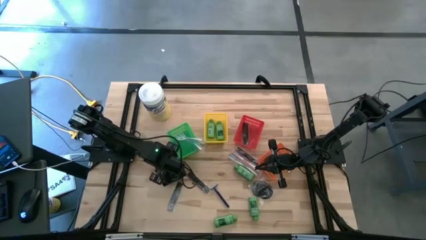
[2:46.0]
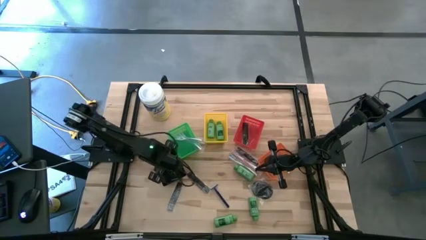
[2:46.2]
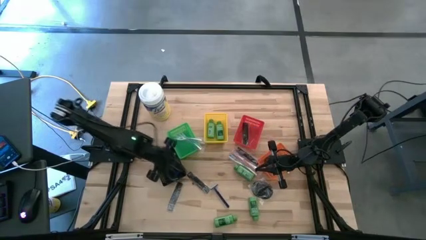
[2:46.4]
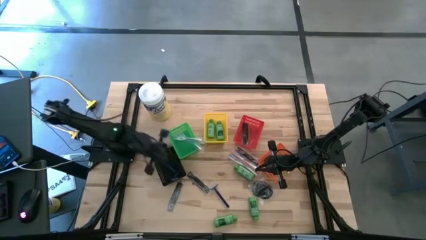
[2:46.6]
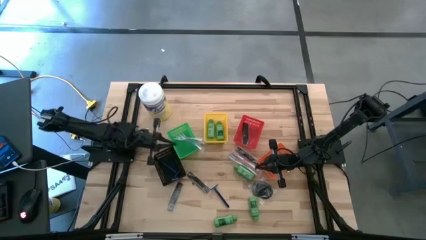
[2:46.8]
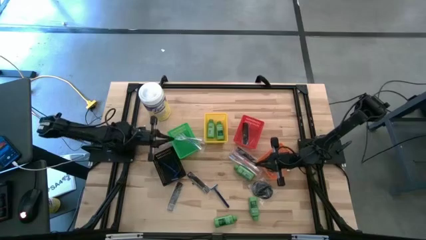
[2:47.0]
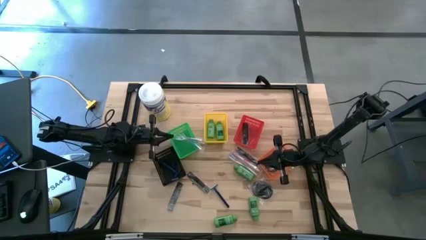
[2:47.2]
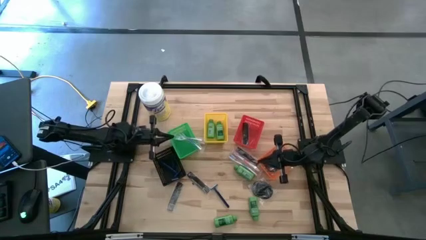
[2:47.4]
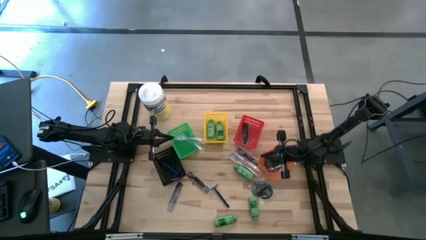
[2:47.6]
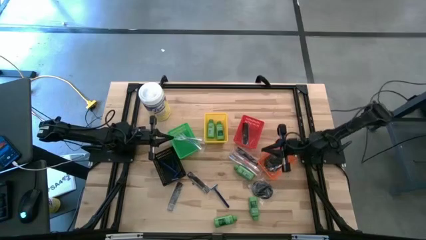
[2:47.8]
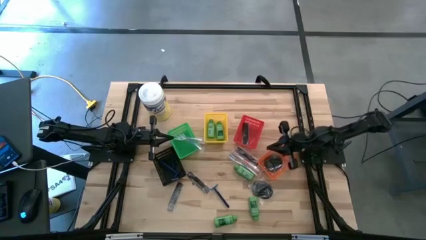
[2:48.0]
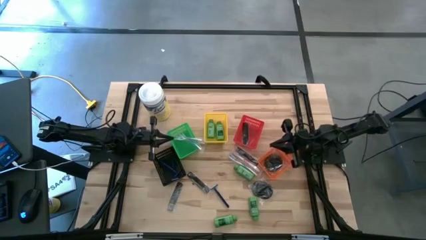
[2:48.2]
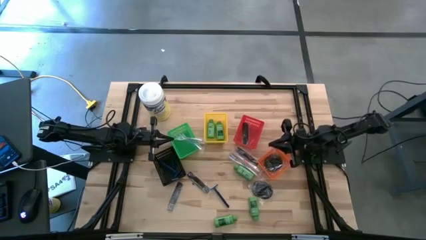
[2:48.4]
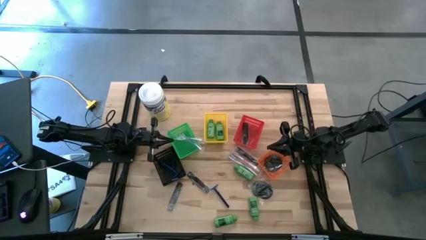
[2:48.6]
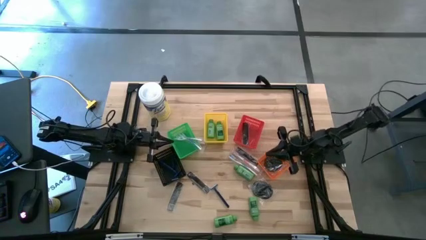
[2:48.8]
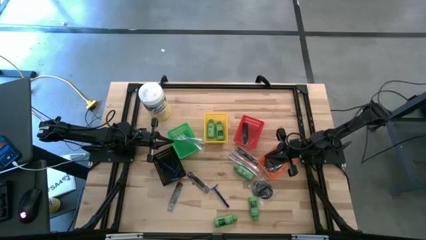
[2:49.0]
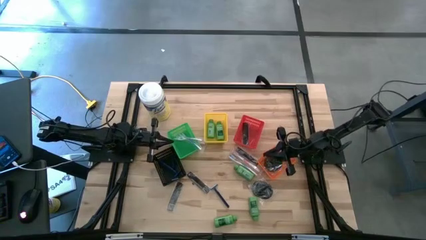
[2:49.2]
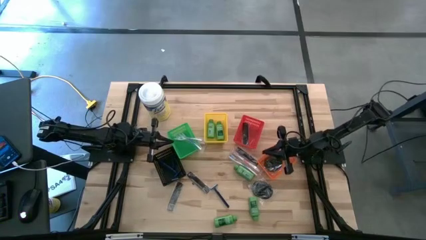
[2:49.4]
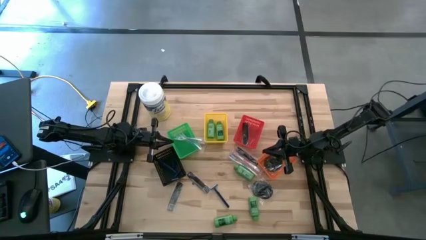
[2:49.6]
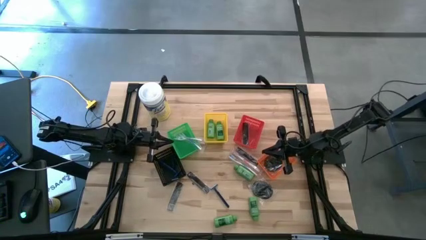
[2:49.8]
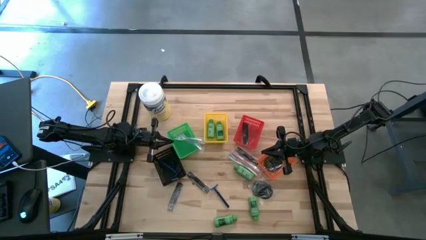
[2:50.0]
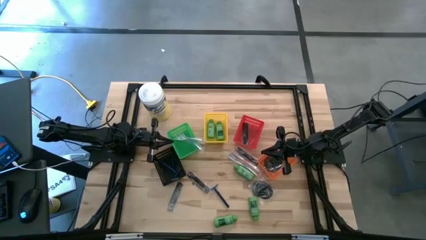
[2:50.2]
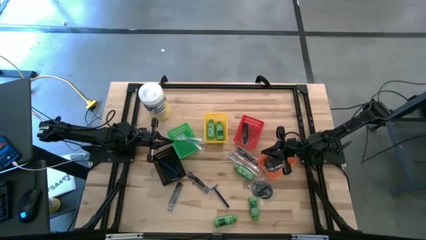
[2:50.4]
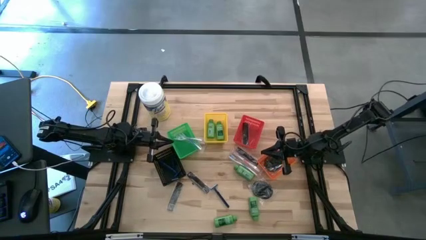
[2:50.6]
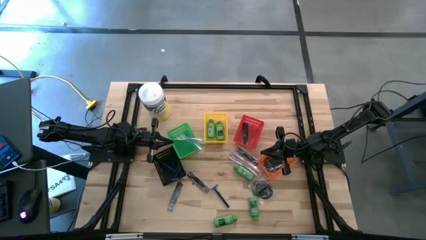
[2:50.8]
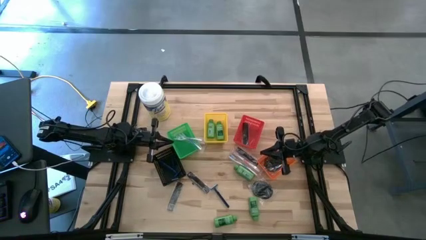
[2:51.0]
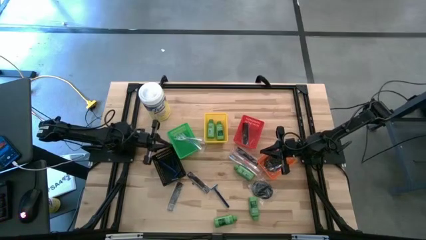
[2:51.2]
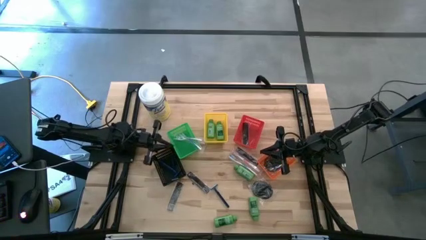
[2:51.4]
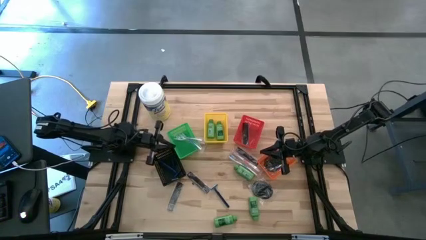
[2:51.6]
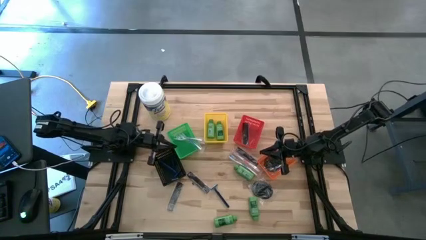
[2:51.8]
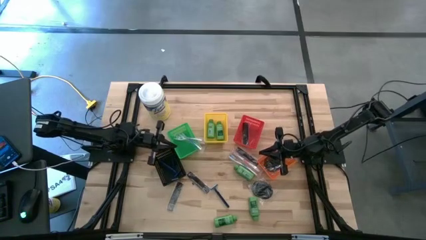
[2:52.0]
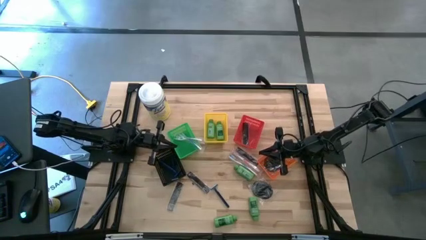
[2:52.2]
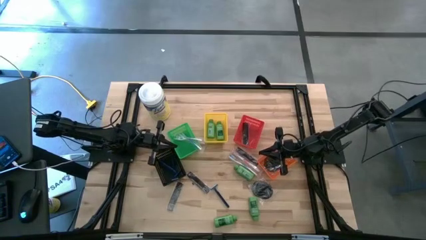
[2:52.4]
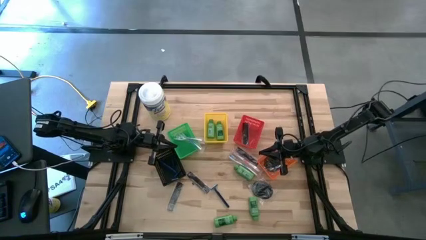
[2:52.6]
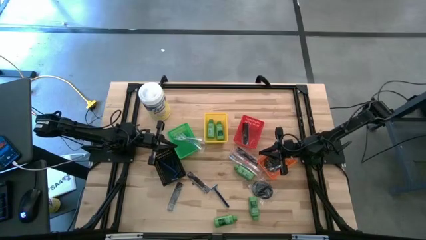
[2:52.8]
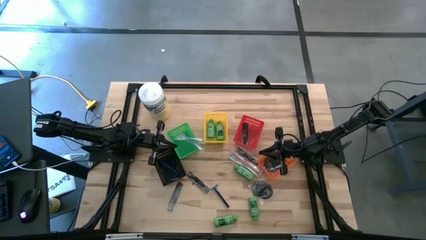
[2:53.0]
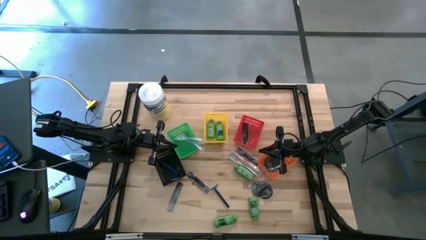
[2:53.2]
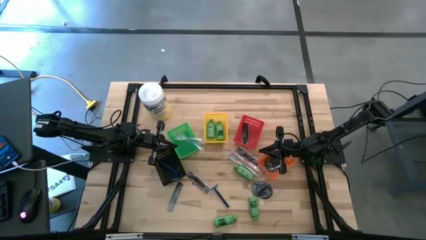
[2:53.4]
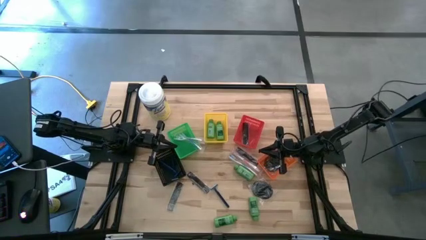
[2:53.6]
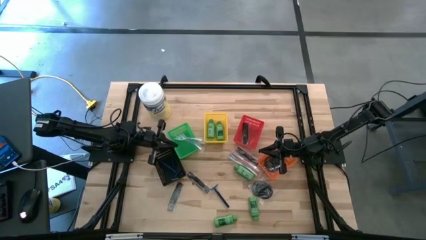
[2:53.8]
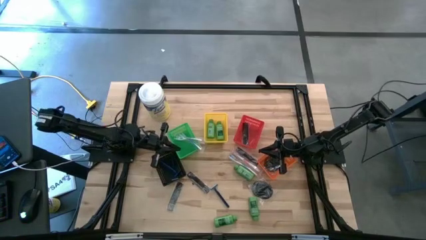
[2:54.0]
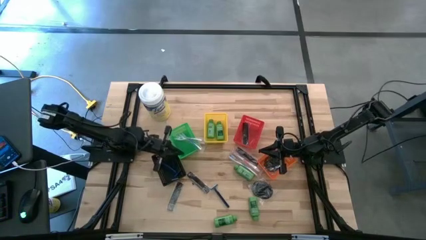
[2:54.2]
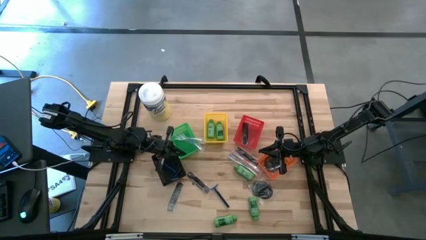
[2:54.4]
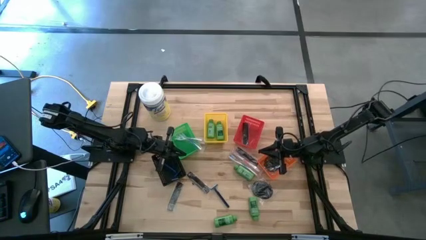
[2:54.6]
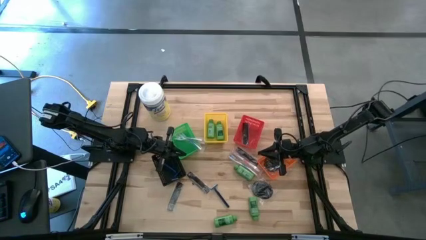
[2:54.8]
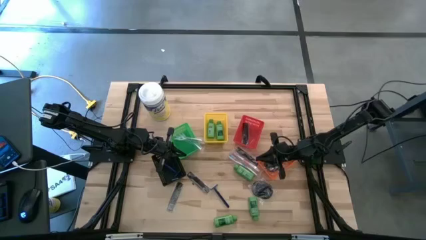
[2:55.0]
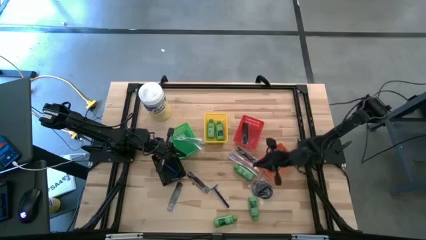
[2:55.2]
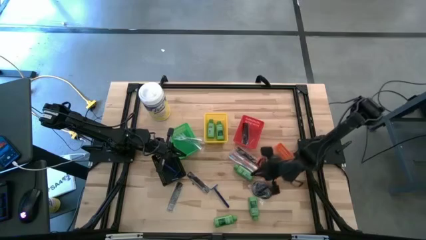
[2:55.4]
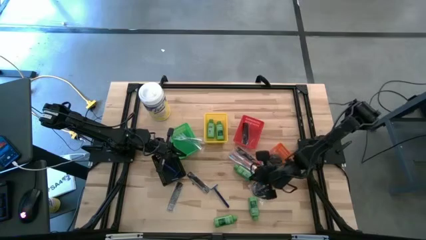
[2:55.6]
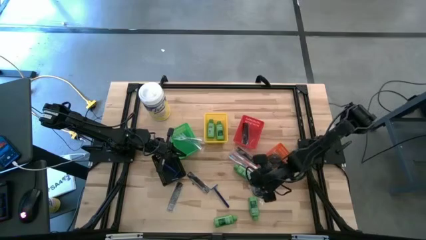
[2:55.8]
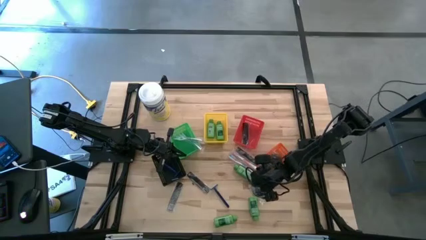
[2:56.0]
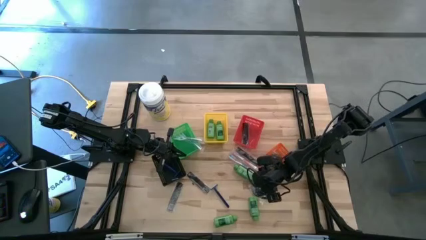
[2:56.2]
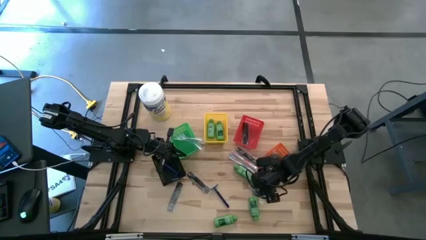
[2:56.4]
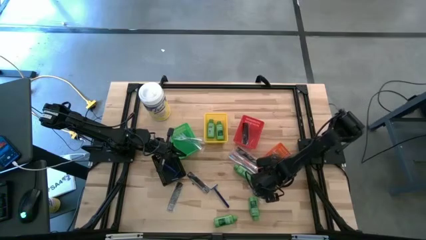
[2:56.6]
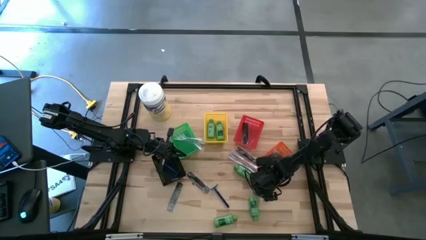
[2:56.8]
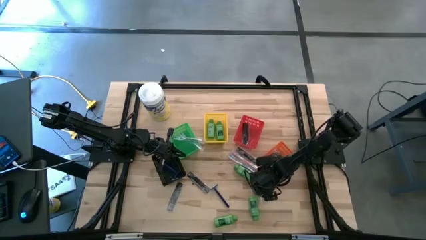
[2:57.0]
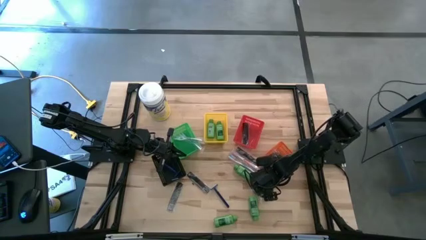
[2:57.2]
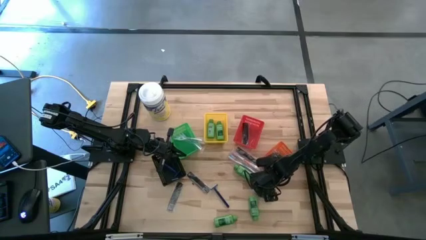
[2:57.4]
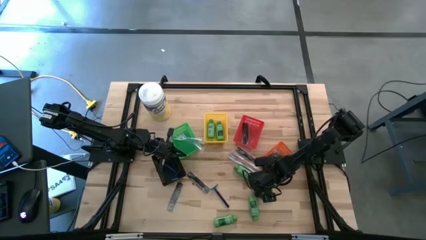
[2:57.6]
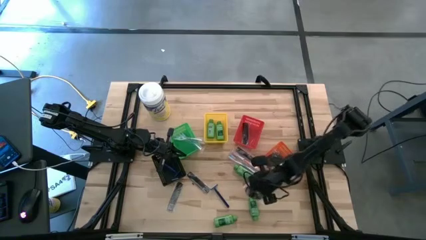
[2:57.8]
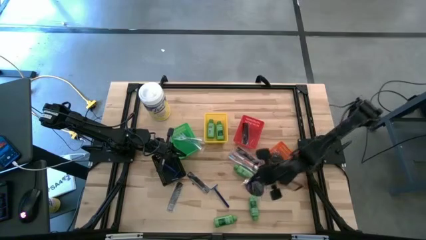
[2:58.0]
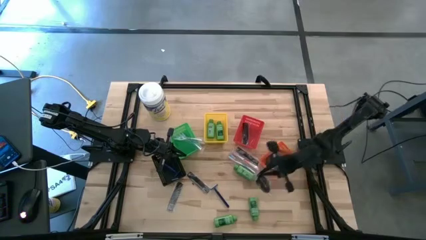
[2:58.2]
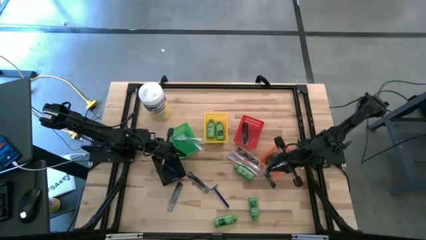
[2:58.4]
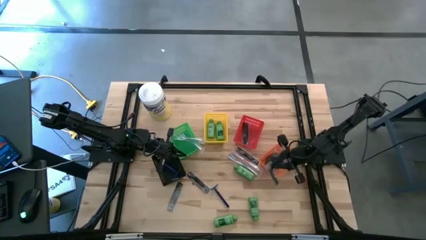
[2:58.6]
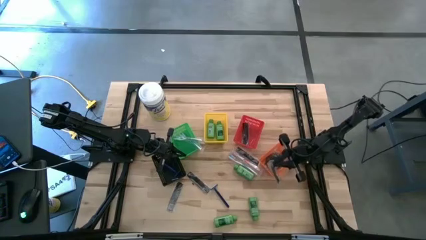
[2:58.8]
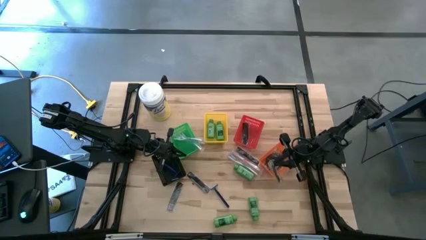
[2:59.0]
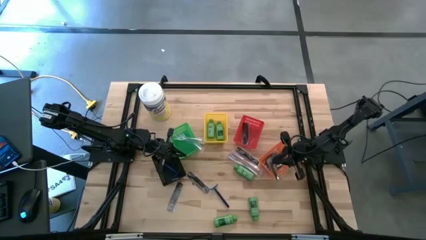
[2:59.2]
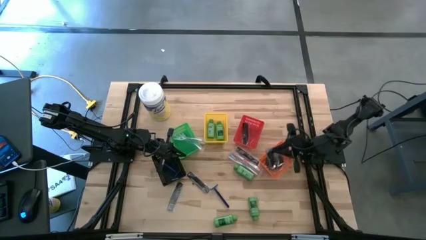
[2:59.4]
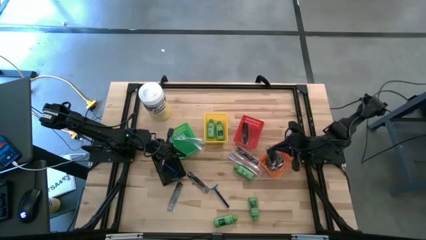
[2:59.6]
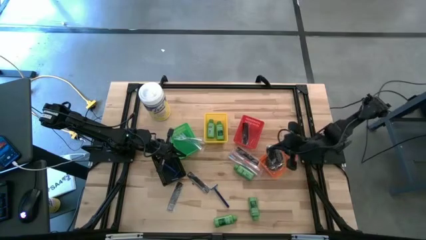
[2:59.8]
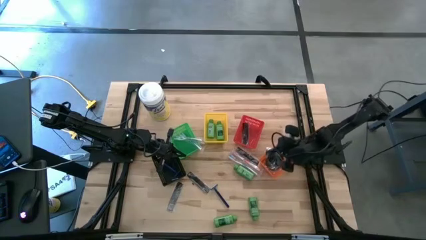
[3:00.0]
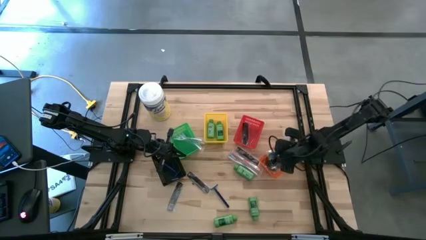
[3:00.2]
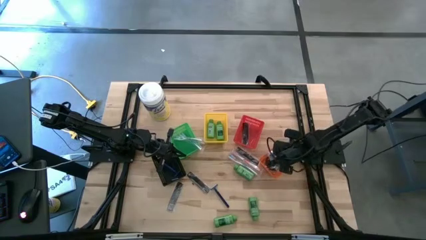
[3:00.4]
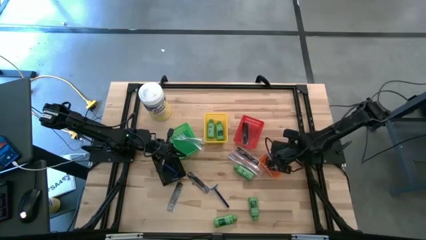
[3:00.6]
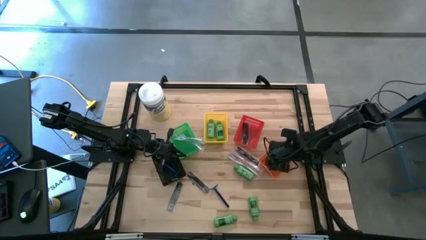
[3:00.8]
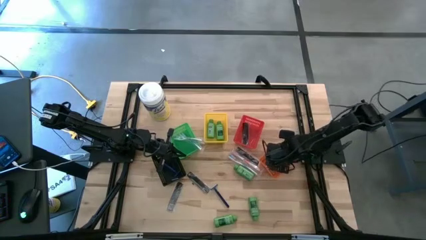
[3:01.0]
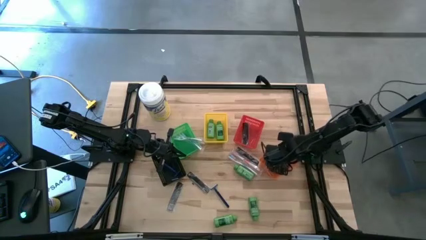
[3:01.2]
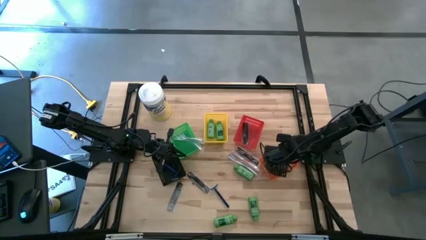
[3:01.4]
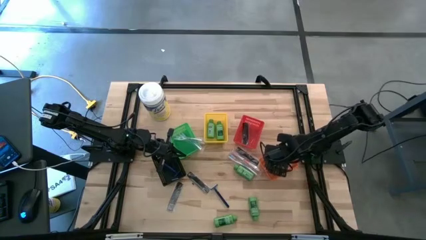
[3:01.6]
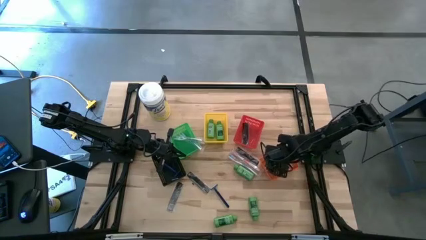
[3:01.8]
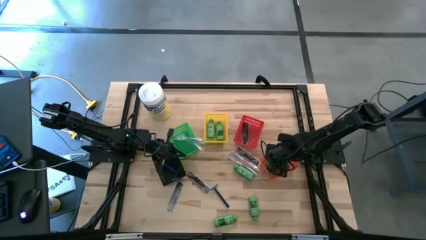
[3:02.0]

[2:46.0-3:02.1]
Task: Pick & Place Travel size toiletries
Put the black hairbrush into the orange bin
